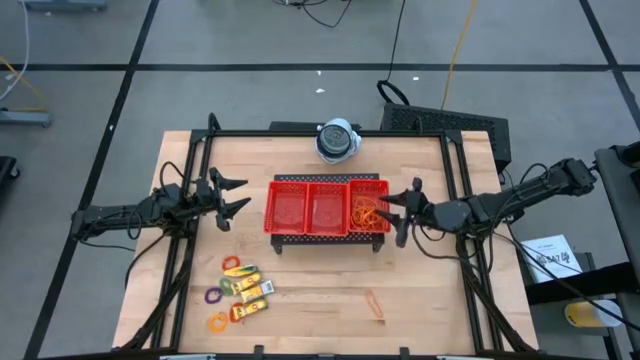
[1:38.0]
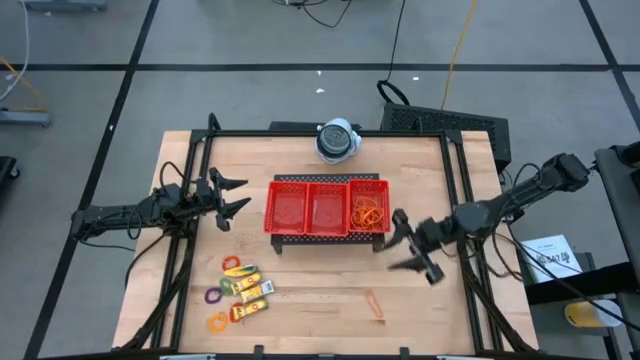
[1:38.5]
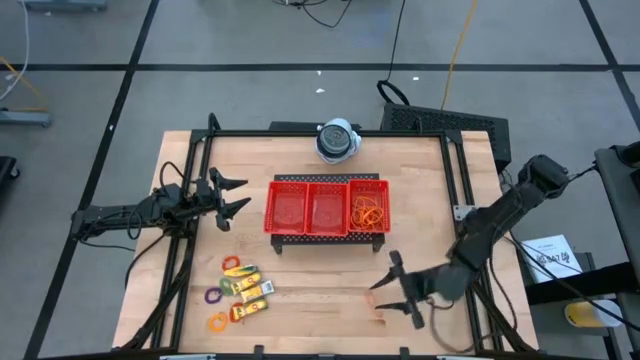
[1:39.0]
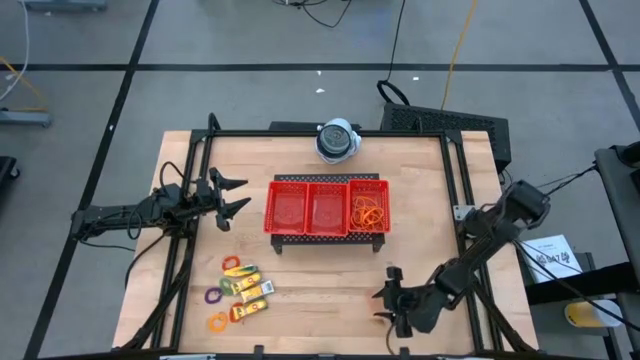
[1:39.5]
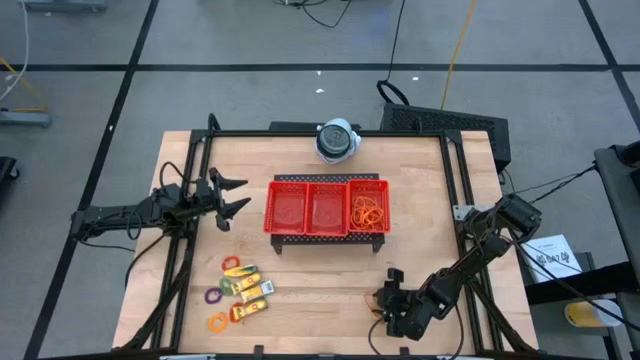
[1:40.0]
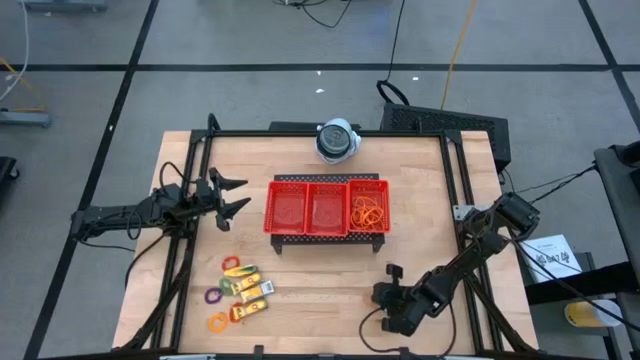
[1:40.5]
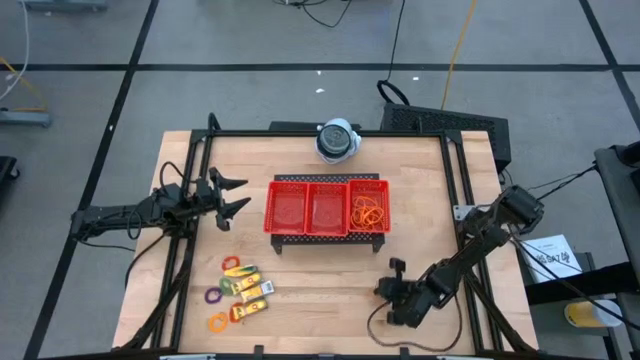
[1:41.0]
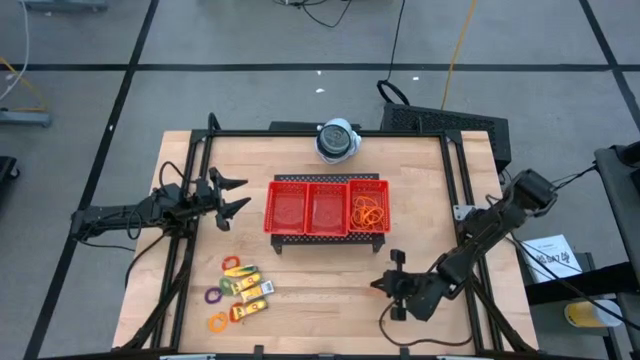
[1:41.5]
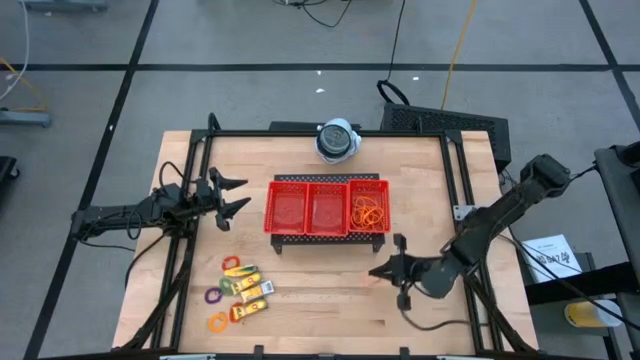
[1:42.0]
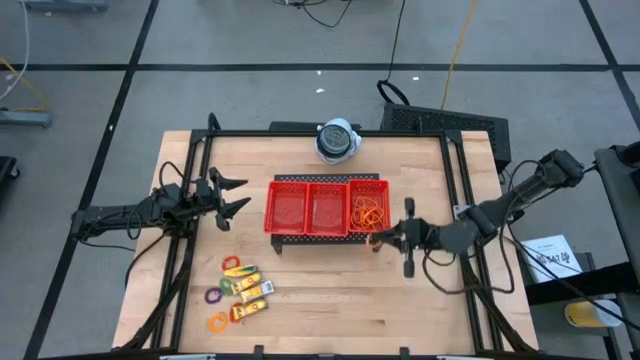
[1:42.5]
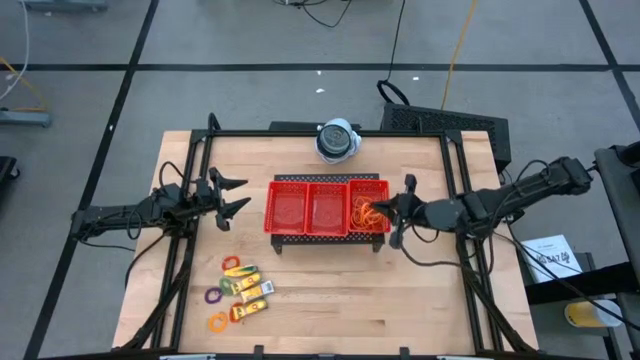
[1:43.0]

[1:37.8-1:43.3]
Task: Pick & Place Office Desk Supplies
Put the orange rubber band into the right red bin

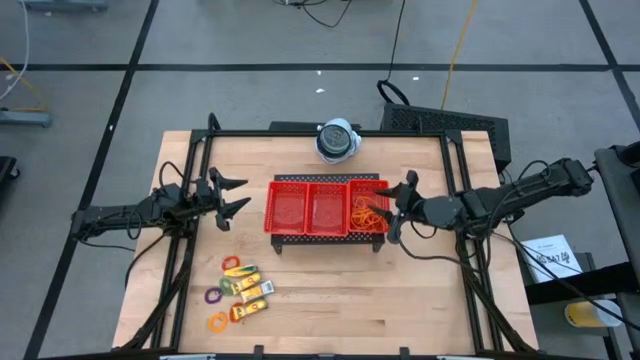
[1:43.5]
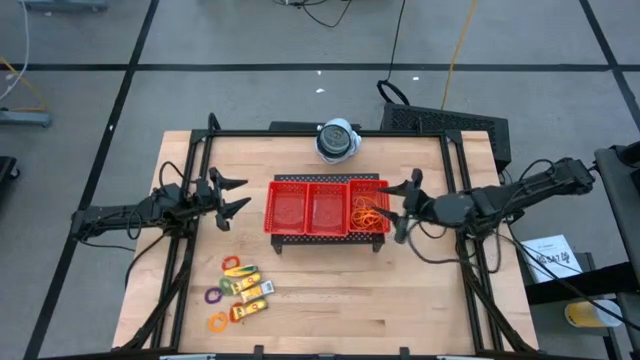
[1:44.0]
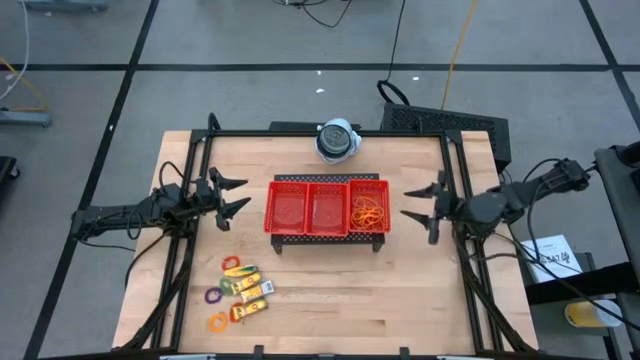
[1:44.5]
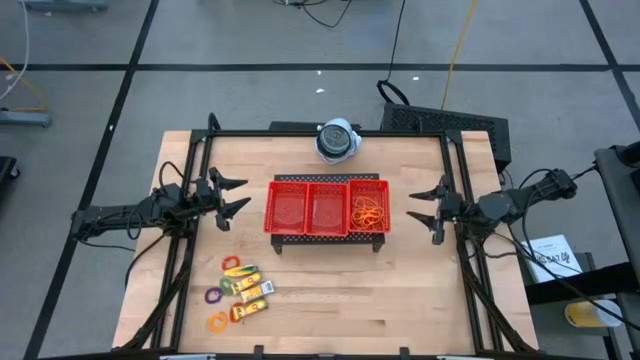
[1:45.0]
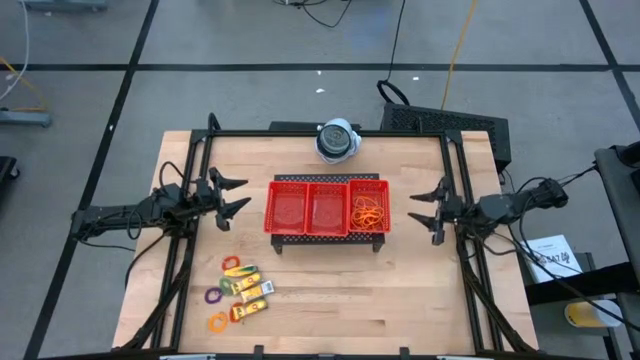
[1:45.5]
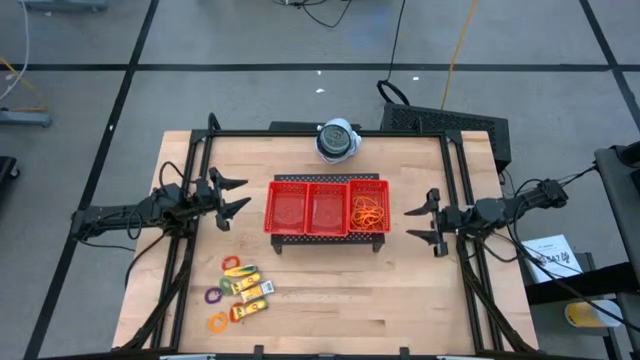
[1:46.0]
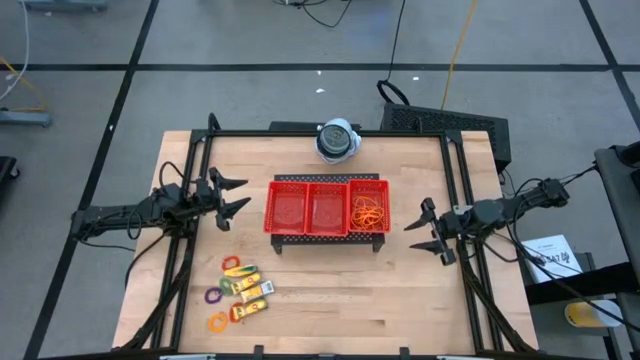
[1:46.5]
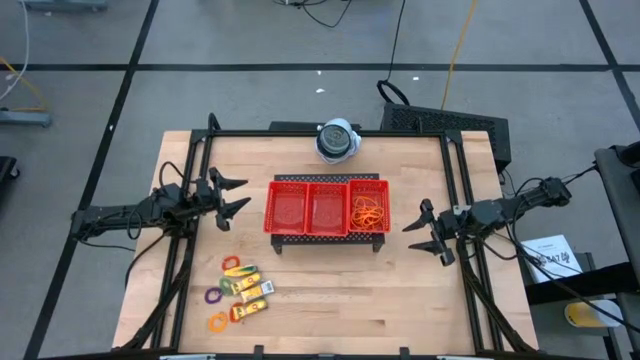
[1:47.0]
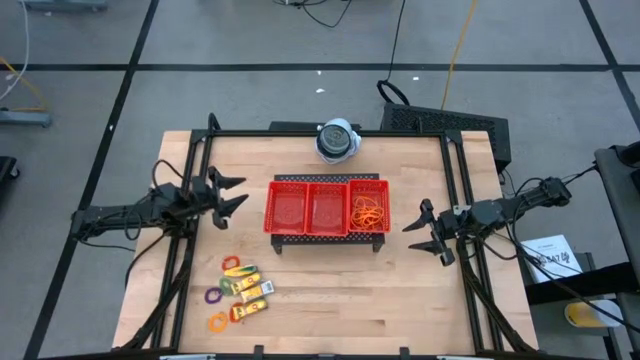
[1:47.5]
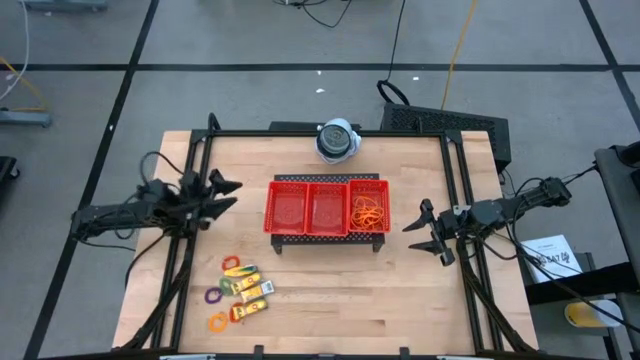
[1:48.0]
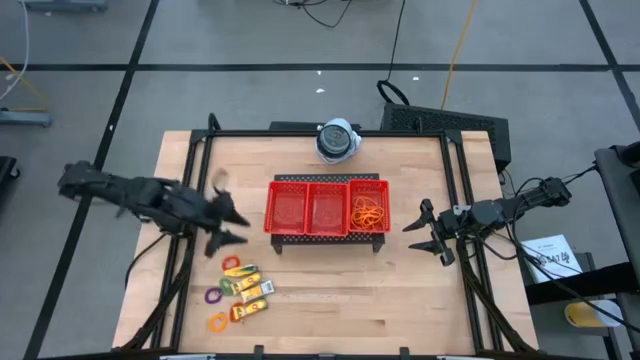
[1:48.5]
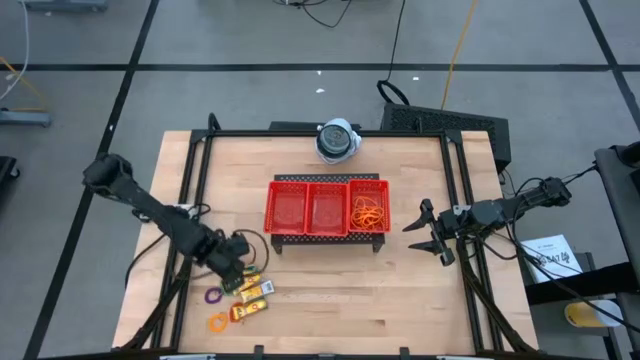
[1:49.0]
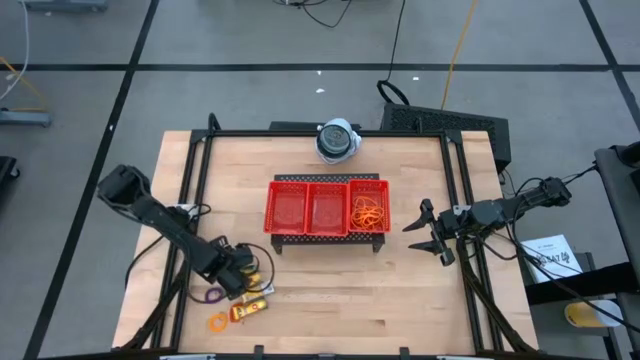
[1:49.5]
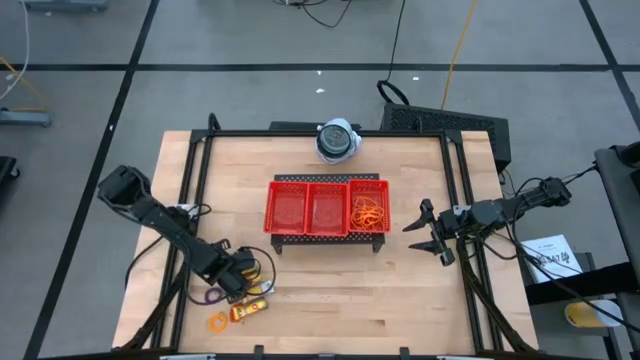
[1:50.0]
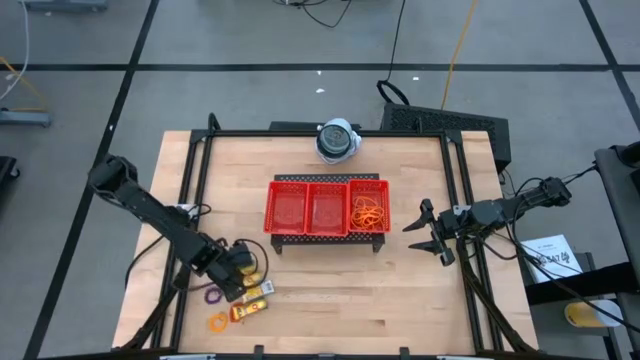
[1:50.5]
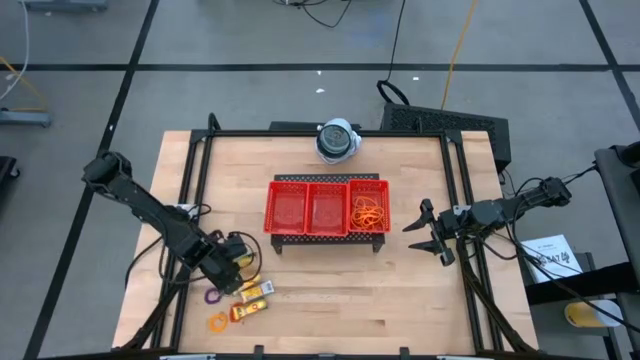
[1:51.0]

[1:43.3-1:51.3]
Put the yellow crayon box into the middle red bin

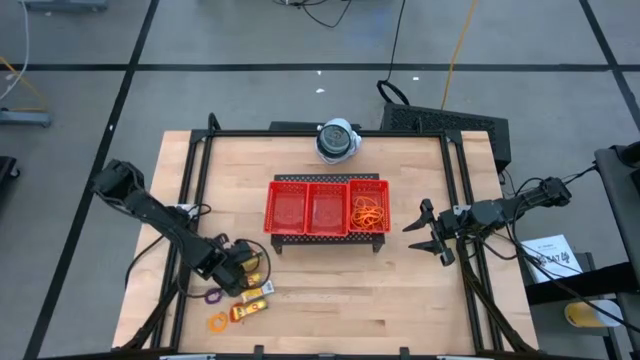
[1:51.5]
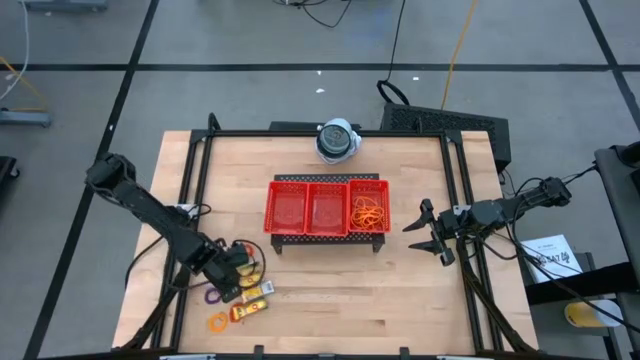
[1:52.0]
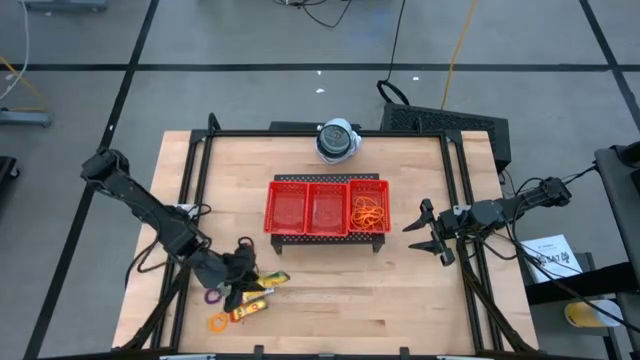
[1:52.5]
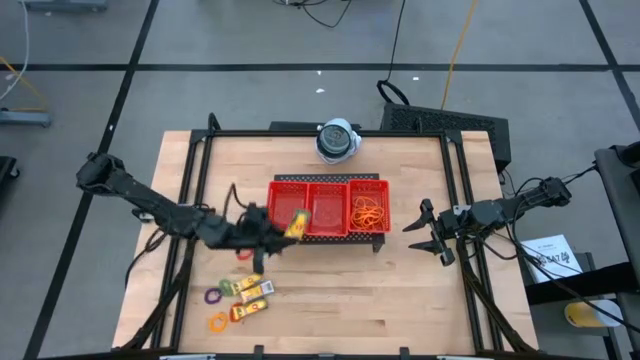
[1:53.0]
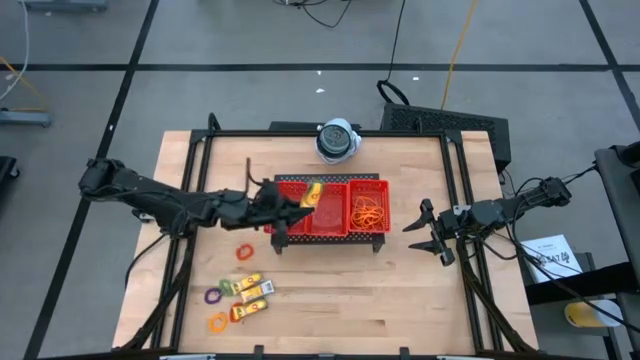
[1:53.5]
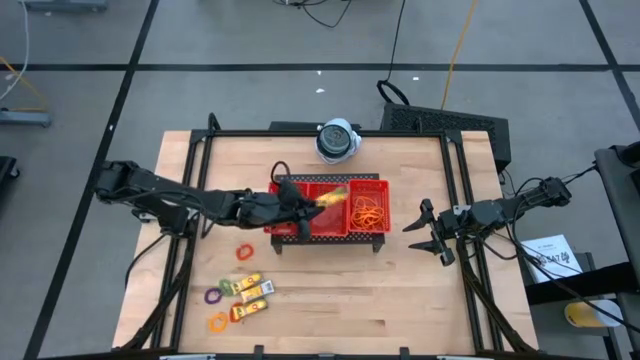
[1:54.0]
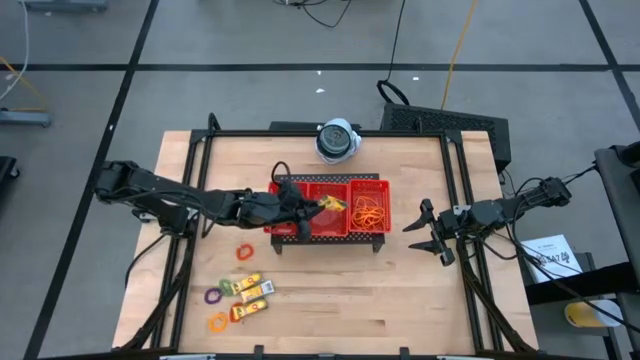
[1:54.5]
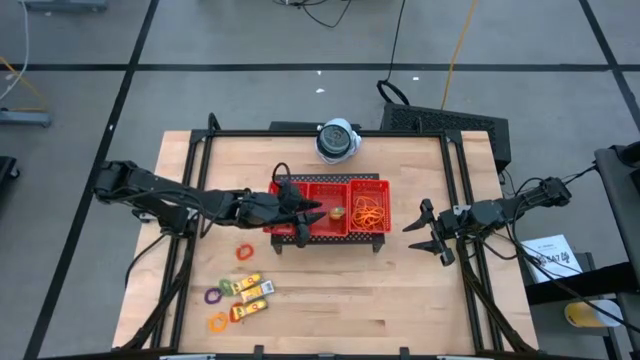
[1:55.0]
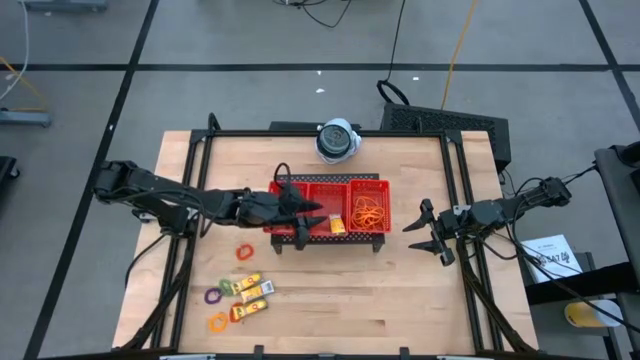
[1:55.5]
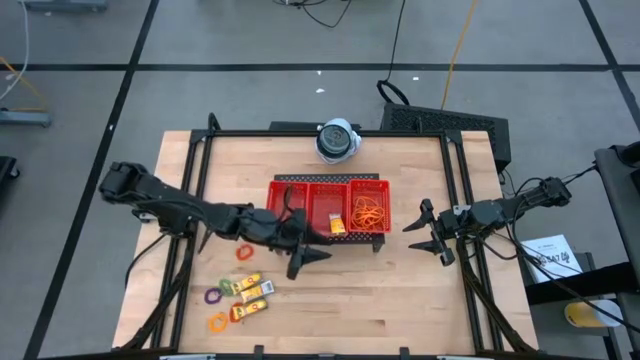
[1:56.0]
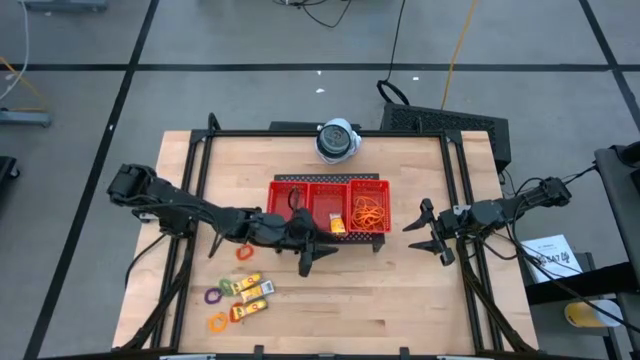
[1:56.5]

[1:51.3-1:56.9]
Put the yellow crayon box into the middle red bin

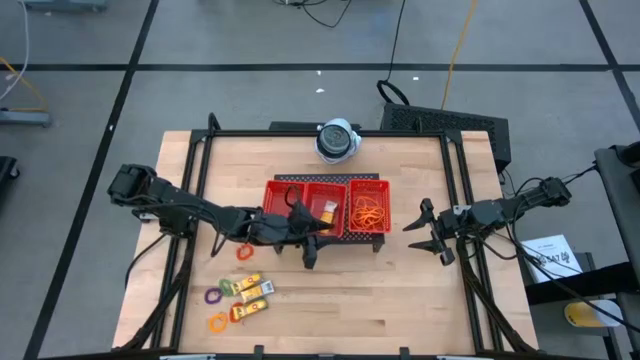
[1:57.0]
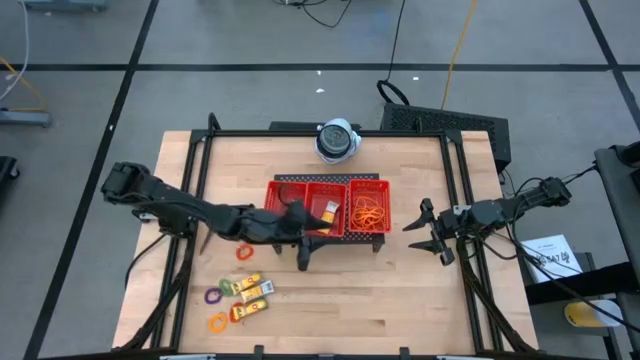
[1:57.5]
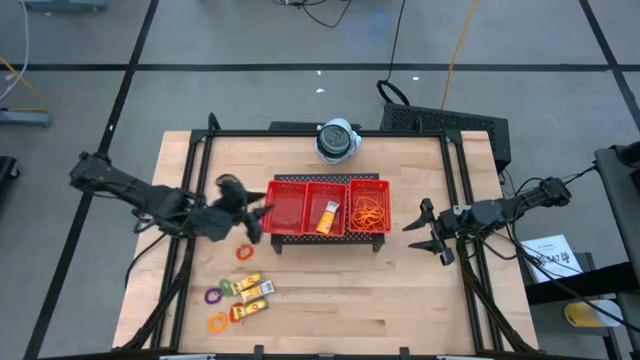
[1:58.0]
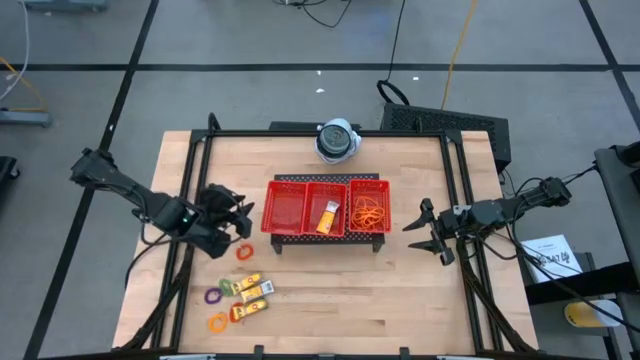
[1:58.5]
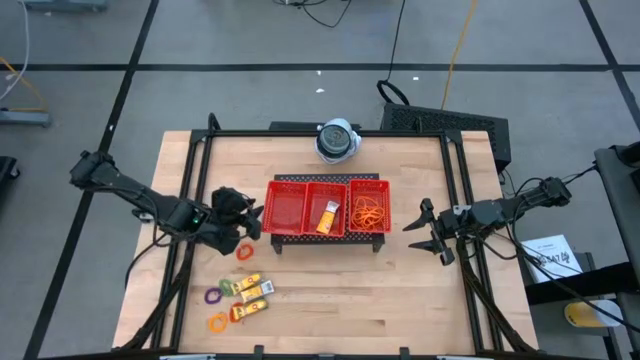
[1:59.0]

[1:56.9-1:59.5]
Adjust the left red bin on the shelf
